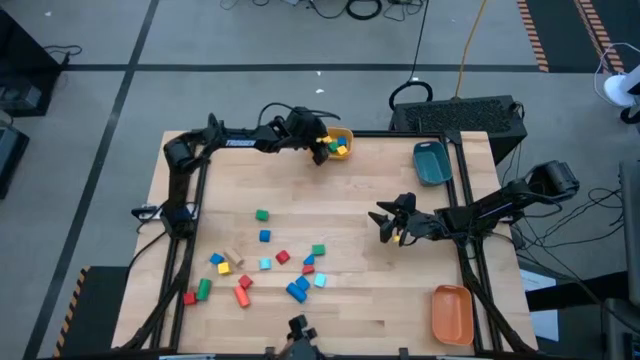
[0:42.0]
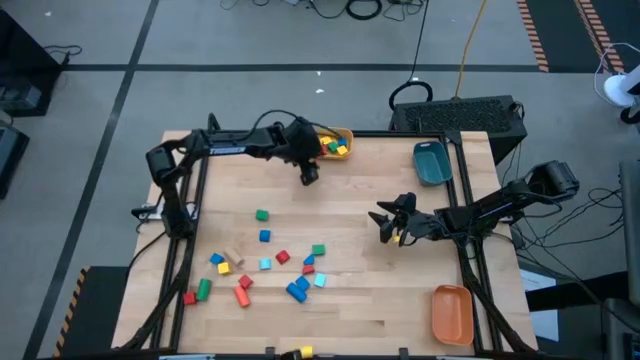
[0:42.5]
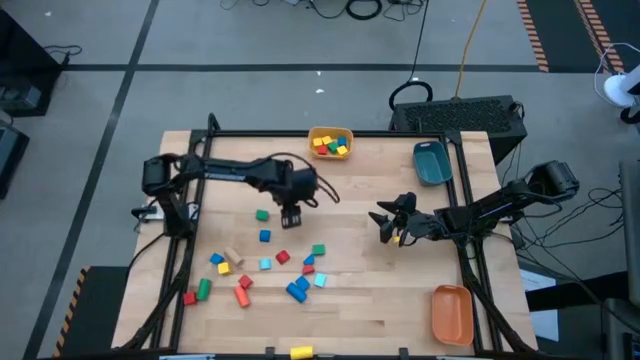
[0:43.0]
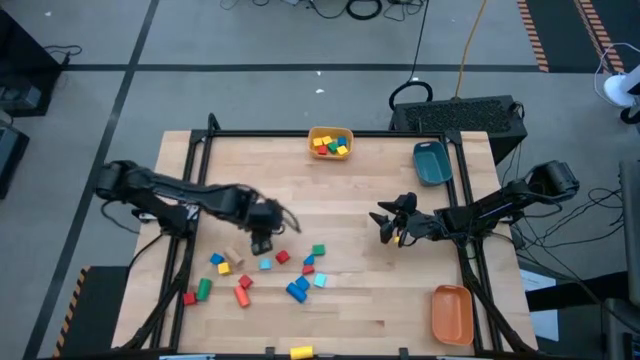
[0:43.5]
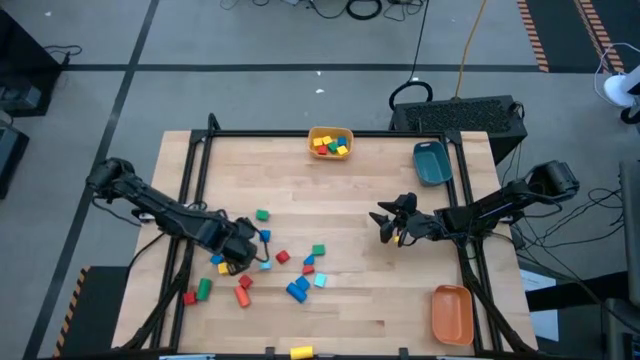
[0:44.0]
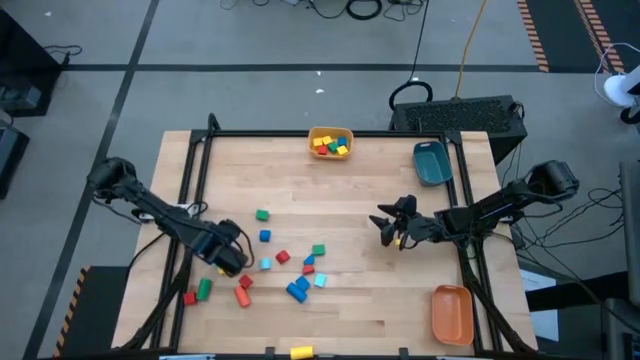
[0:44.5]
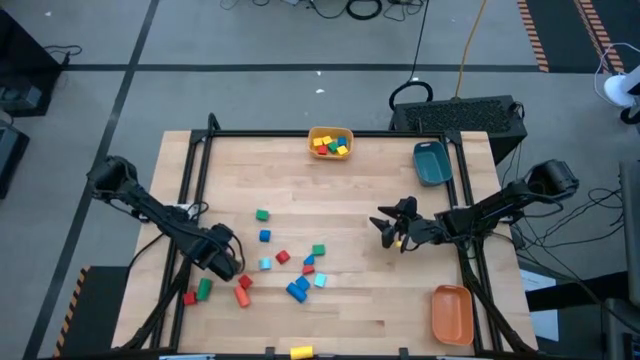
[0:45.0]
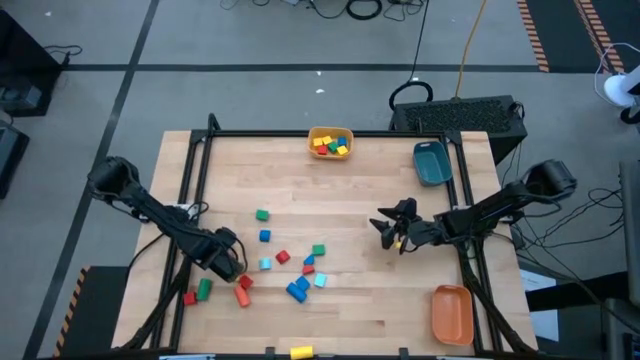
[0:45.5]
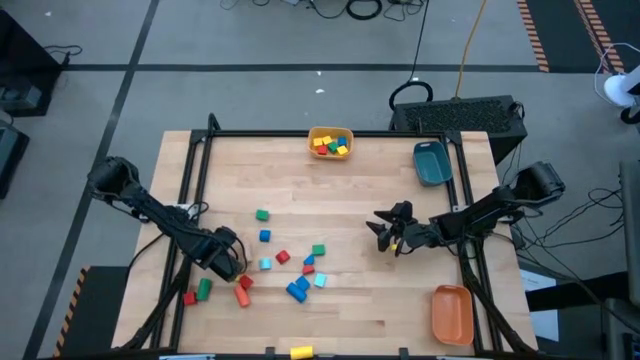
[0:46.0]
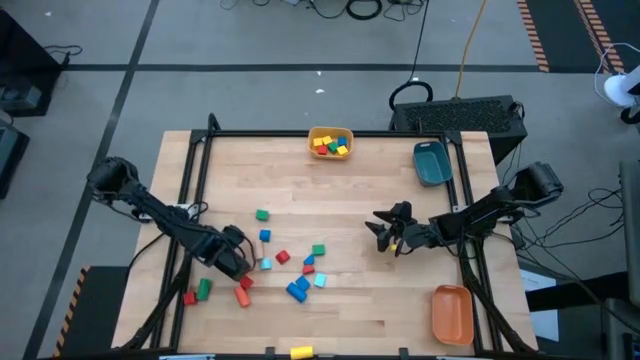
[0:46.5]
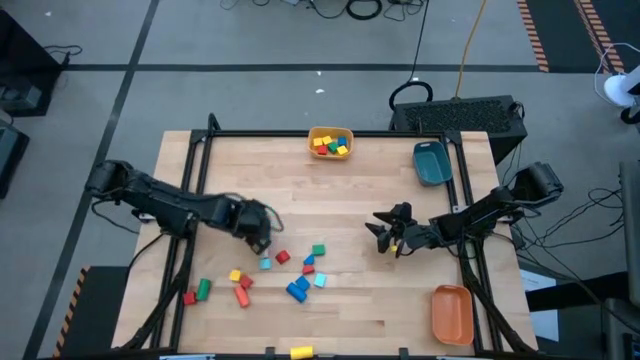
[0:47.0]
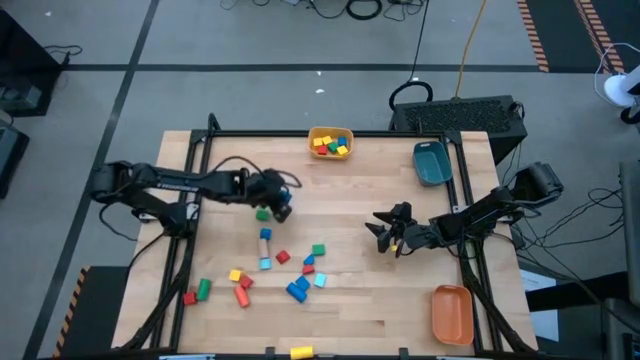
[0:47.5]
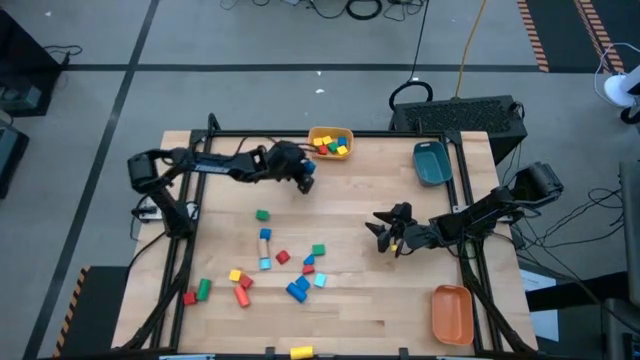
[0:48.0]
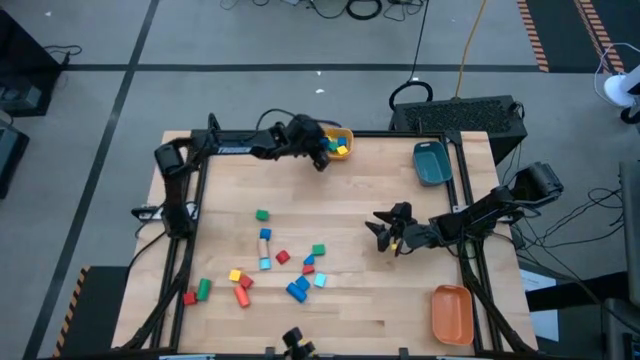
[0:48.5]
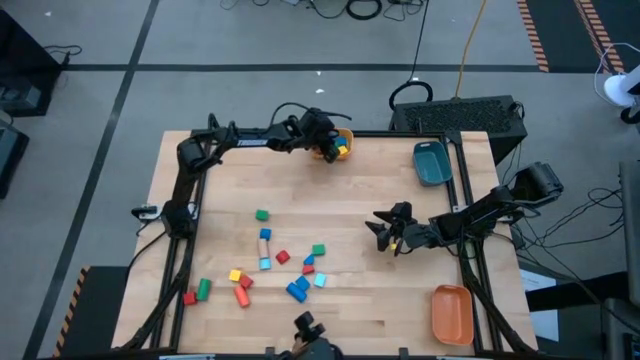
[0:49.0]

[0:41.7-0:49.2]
Task: Sort blocks by size
Put the blue square block into the yellow bin

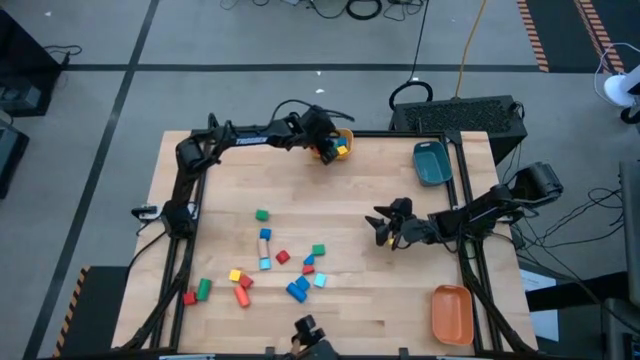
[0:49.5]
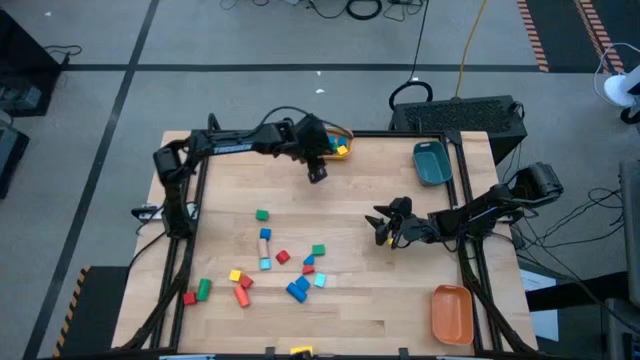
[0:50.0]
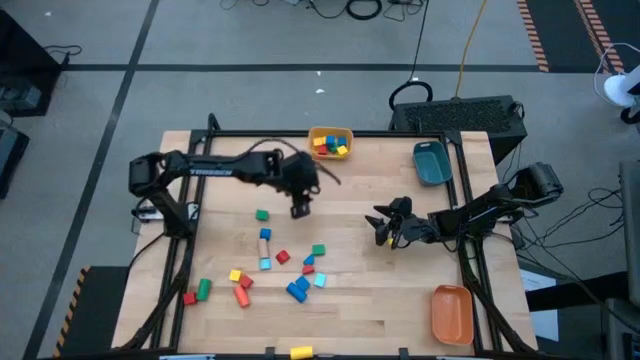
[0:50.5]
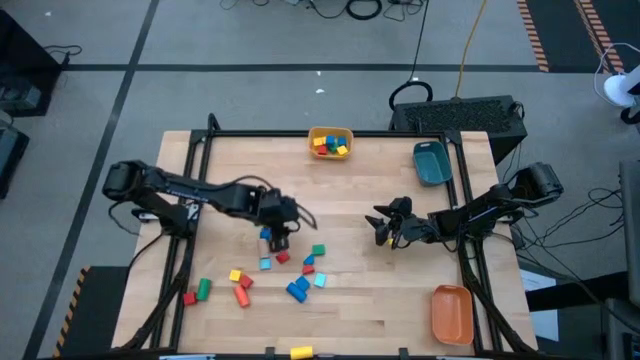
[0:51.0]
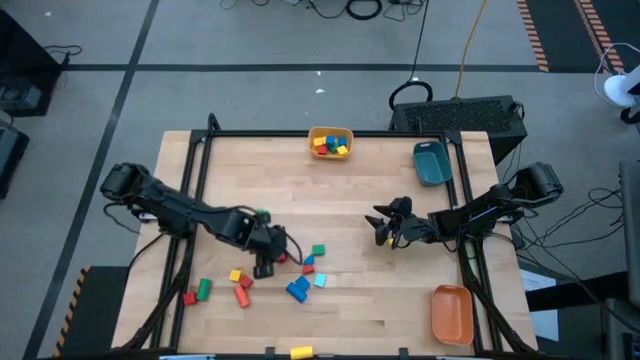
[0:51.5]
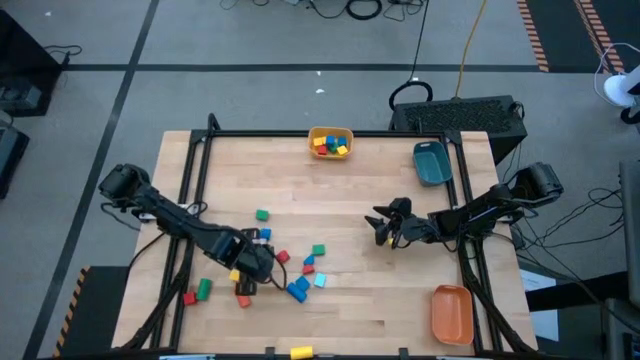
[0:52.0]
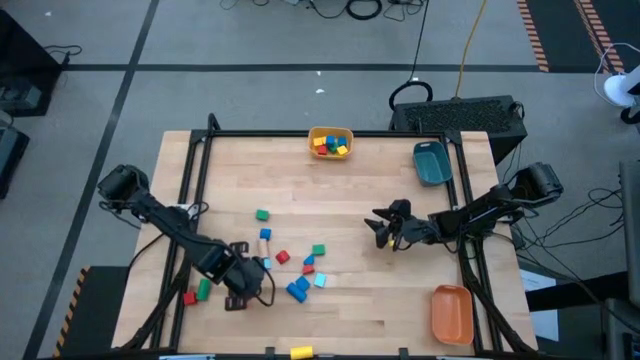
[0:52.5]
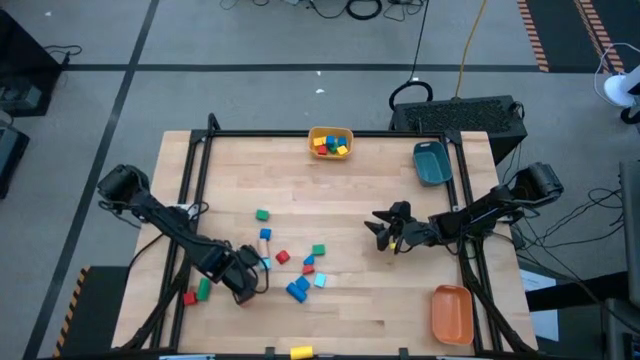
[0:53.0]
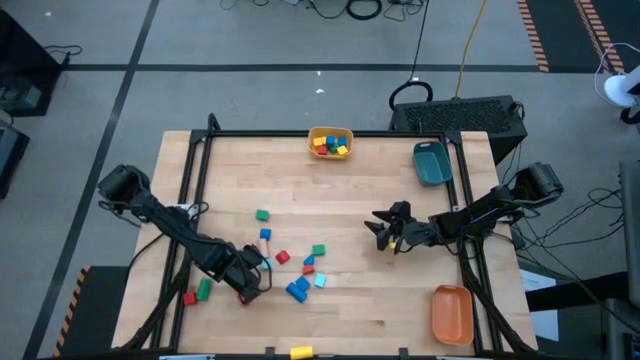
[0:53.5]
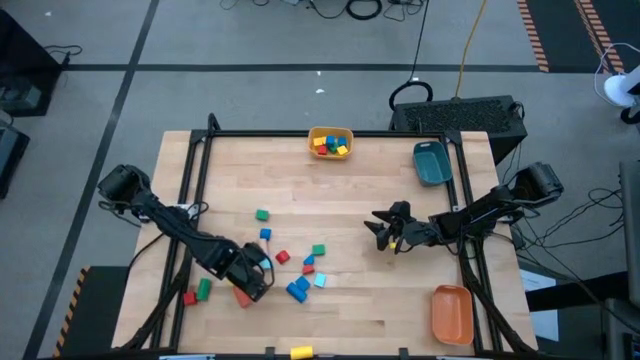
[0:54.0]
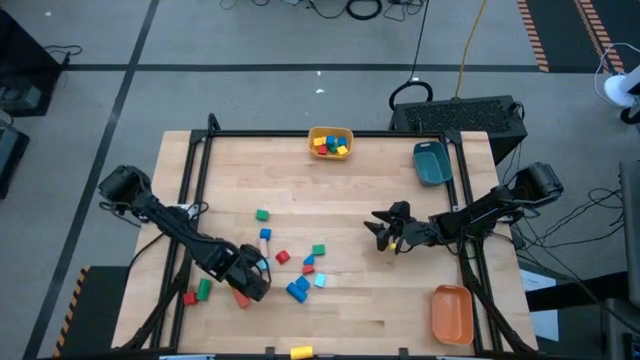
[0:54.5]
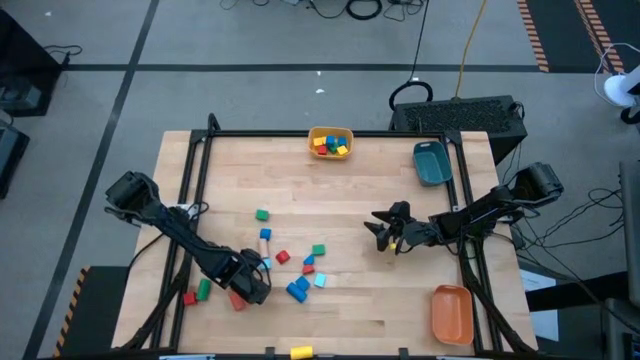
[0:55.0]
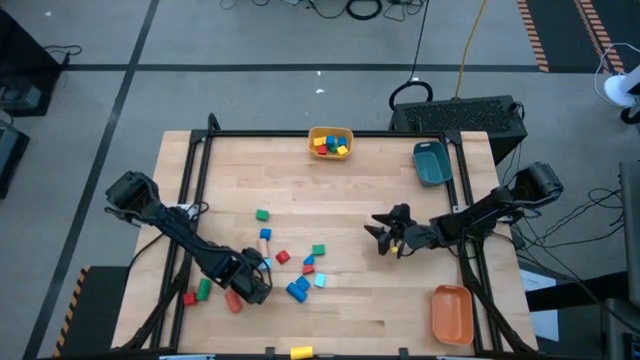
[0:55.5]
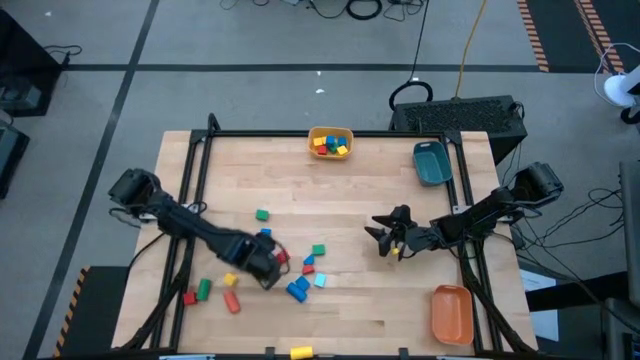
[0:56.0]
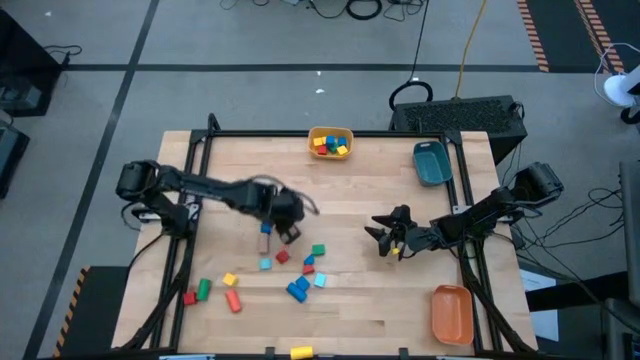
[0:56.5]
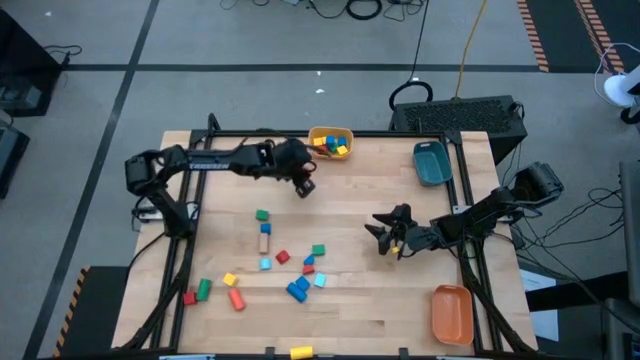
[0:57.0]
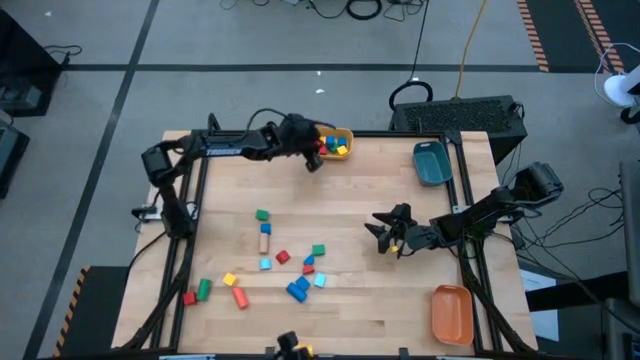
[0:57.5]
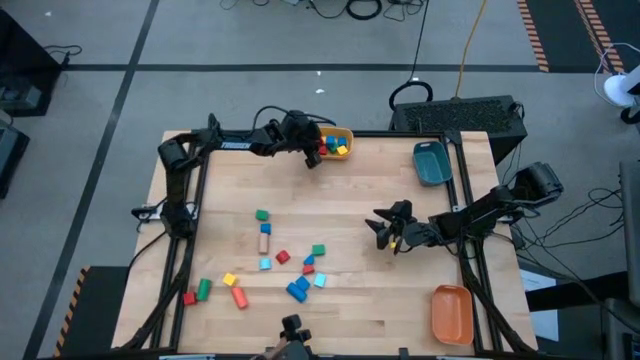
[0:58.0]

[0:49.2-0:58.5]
Put the red square block into the yellow bin

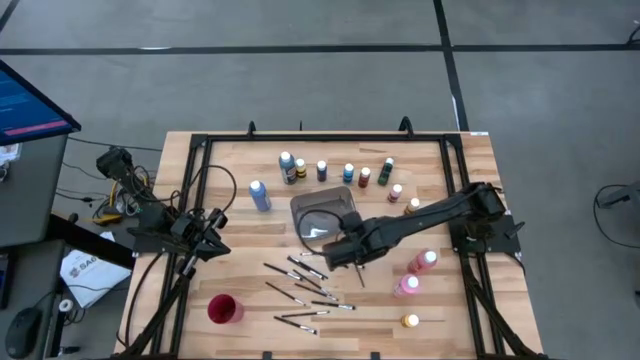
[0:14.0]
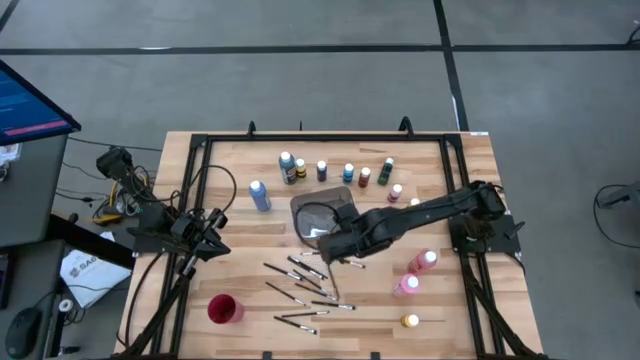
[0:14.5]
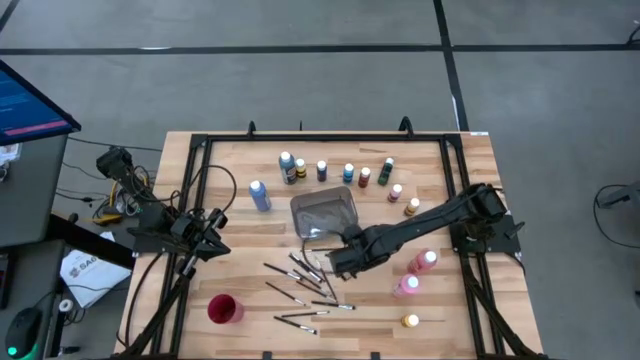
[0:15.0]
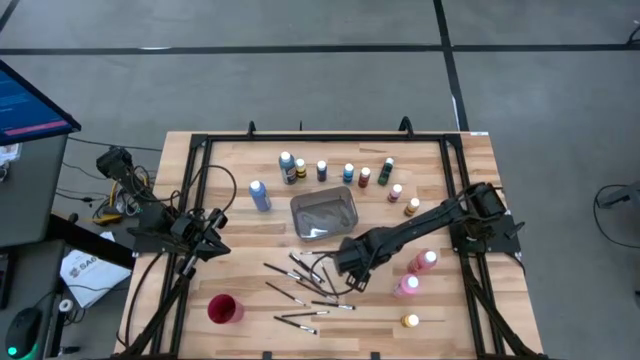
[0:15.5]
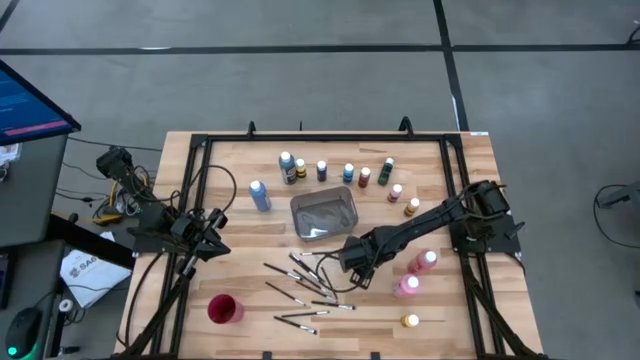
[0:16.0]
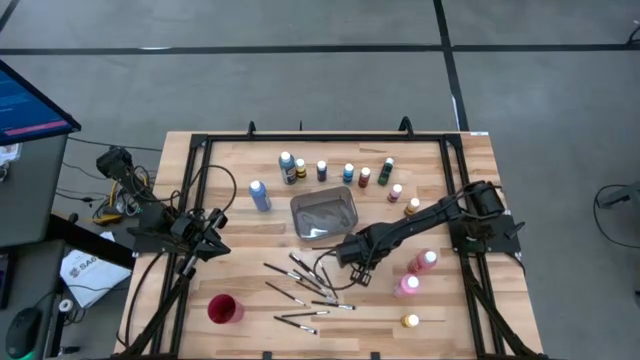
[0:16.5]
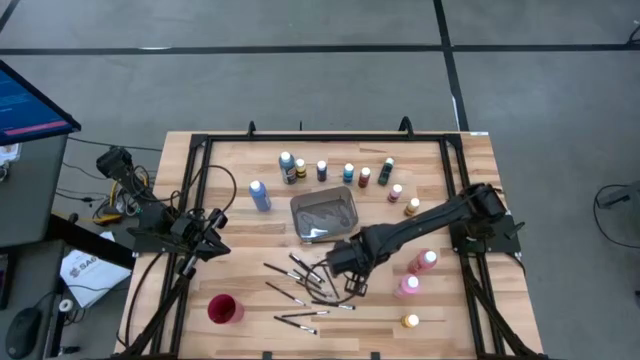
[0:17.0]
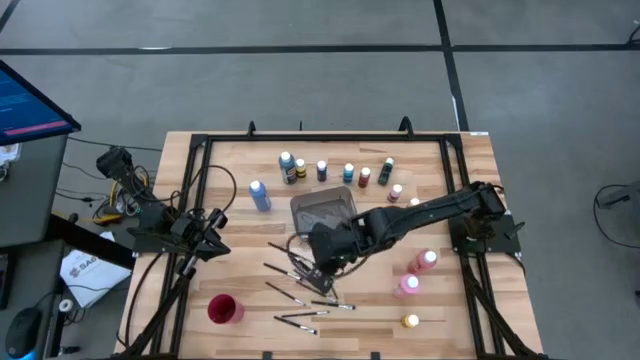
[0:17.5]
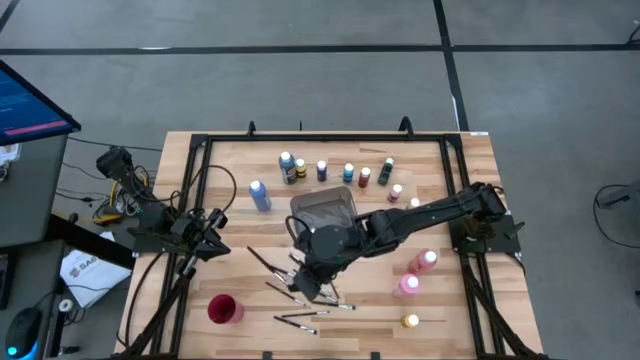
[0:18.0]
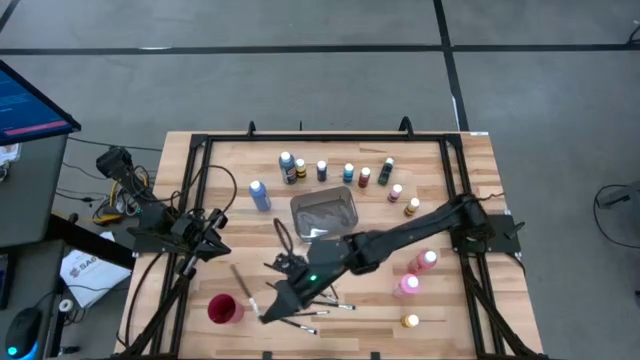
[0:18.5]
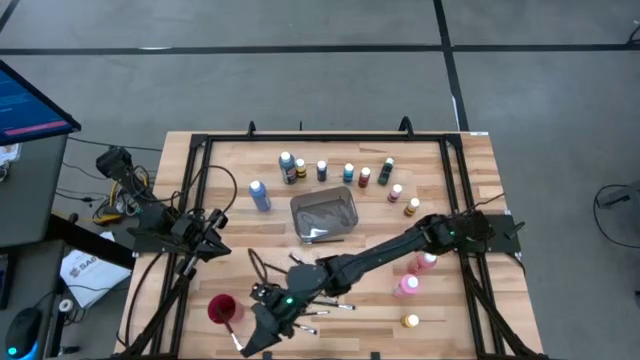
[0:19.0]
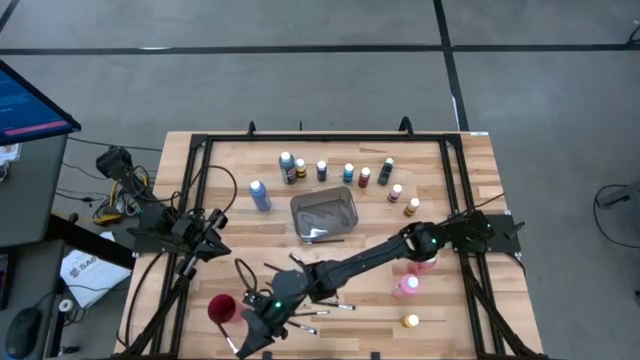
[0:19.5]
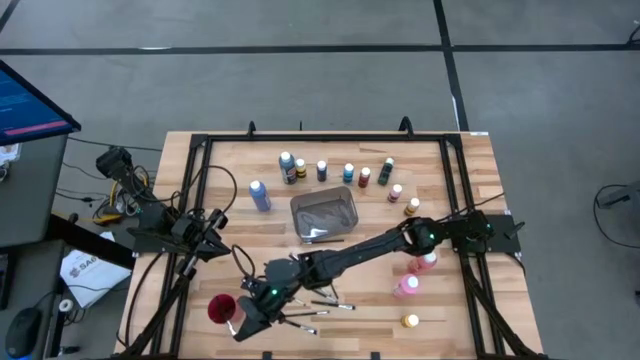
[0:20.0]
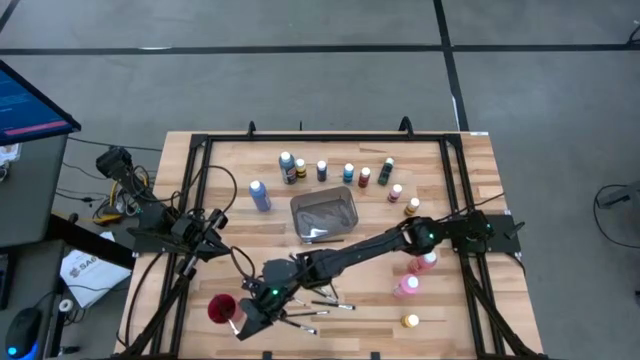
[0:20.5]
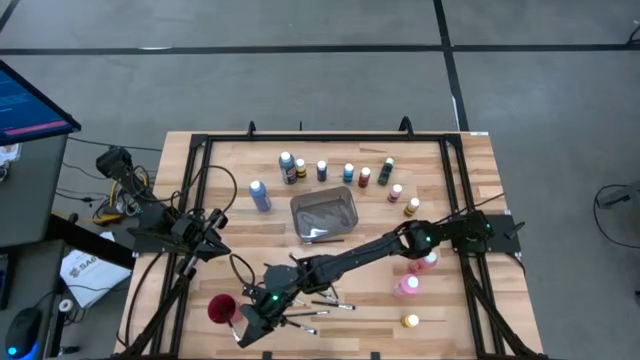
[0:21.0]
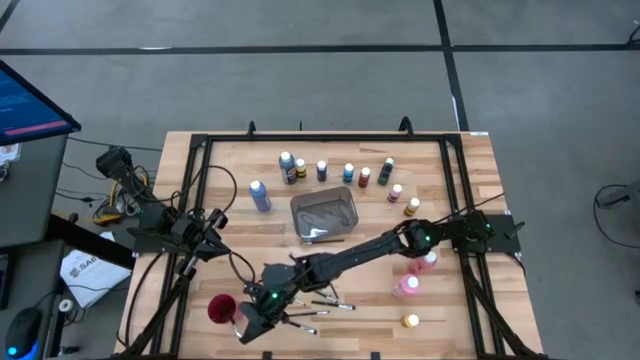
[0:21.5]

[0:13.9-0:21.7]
Task: Pick & Place Paint Supplies
Put the silver paintbrush into the red cup
